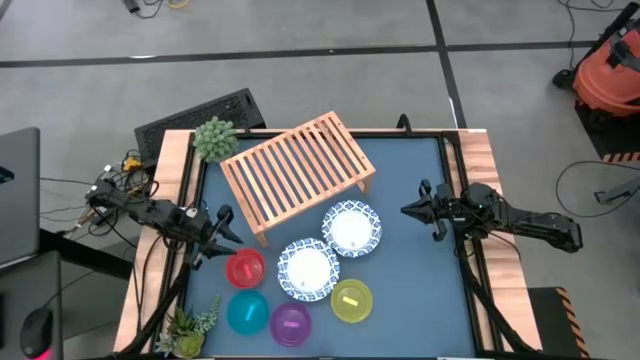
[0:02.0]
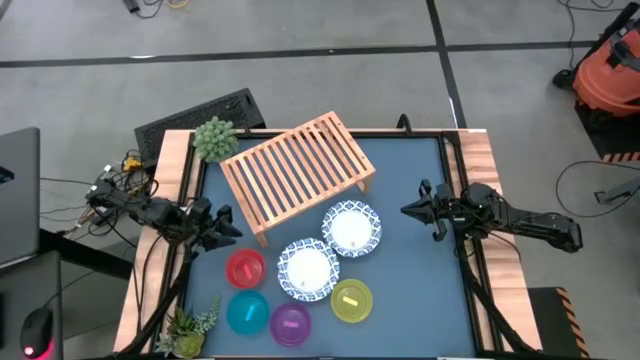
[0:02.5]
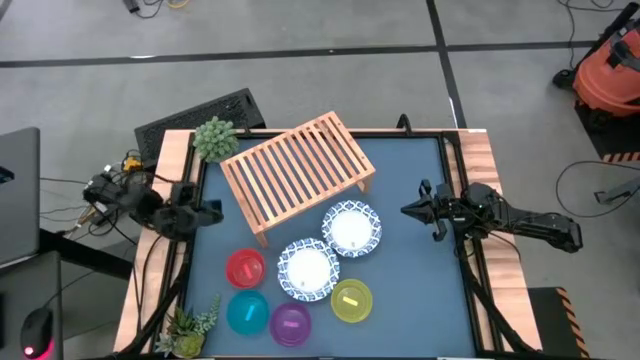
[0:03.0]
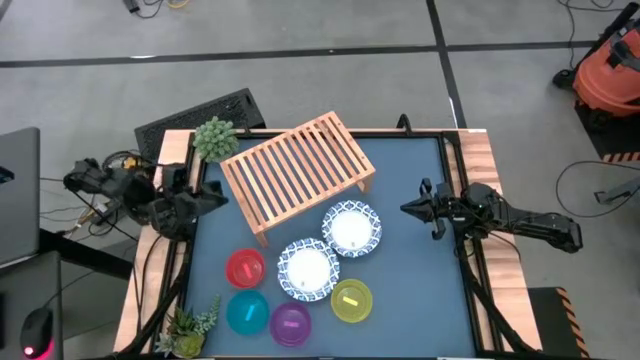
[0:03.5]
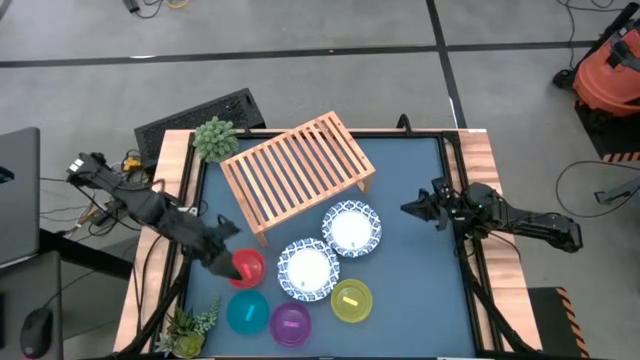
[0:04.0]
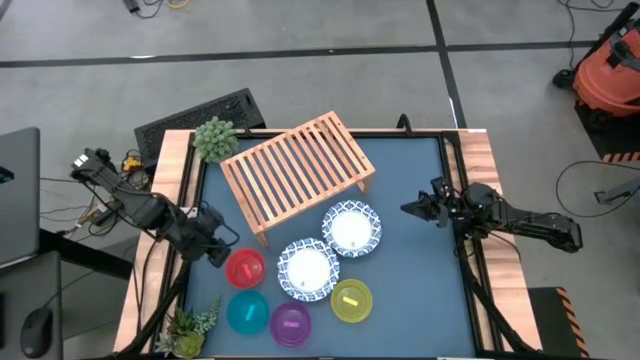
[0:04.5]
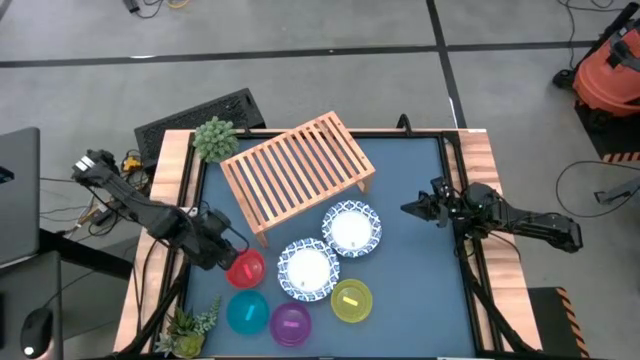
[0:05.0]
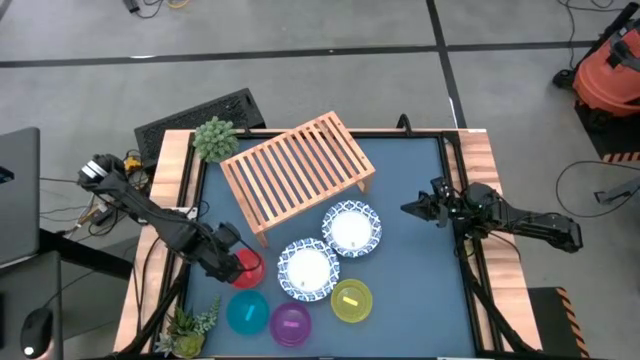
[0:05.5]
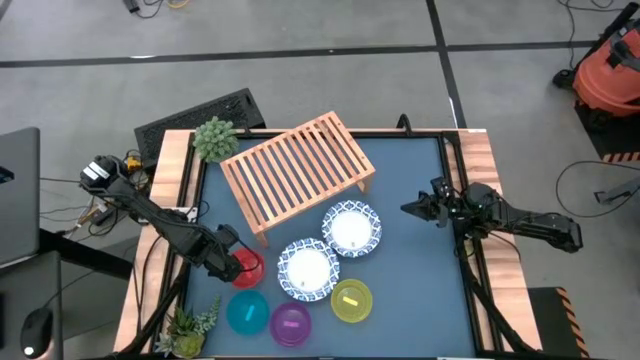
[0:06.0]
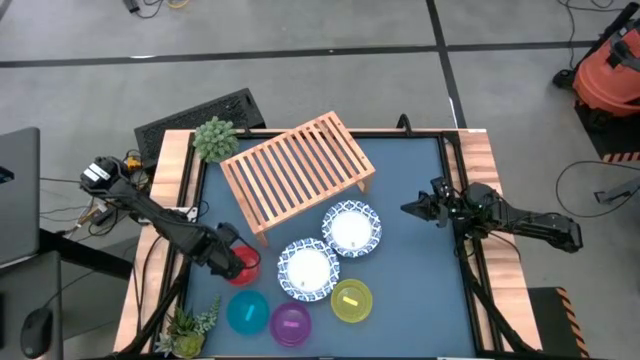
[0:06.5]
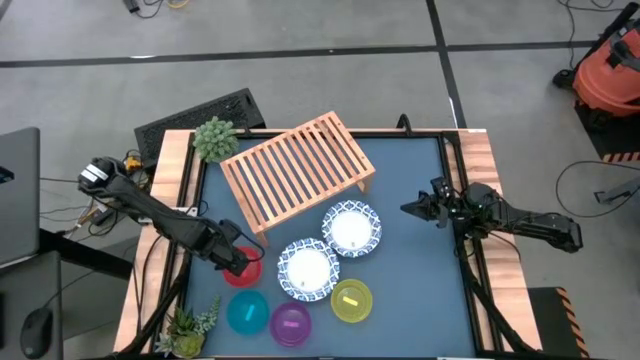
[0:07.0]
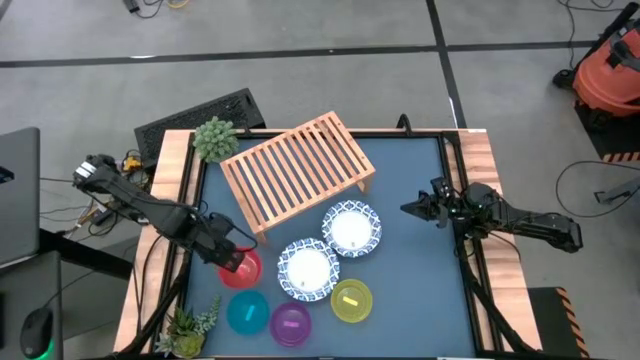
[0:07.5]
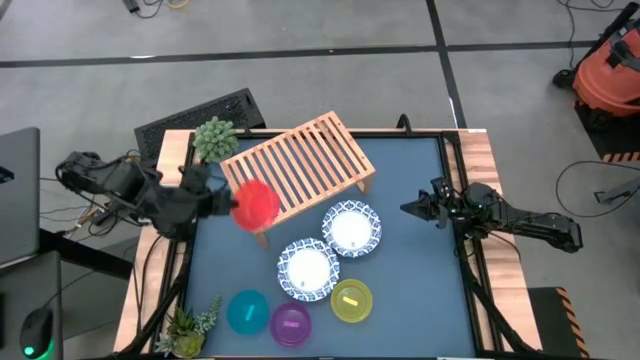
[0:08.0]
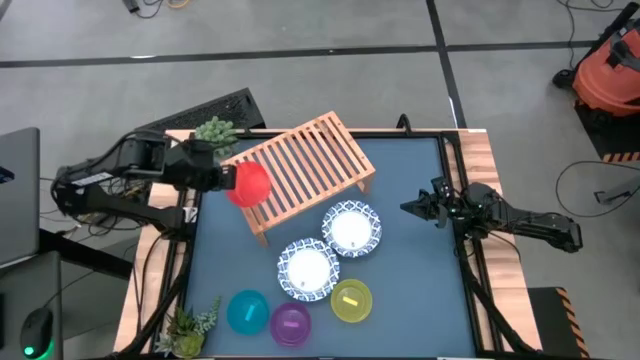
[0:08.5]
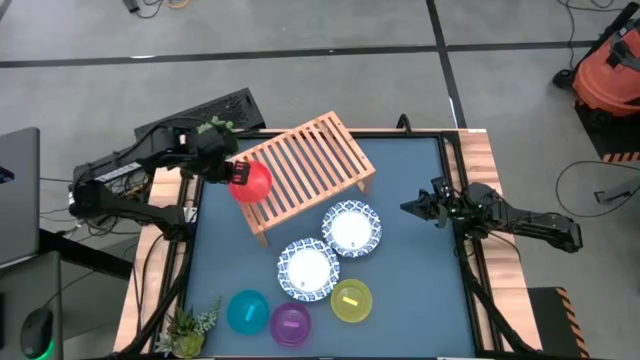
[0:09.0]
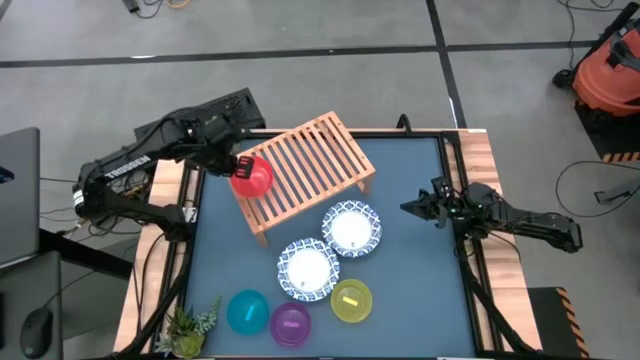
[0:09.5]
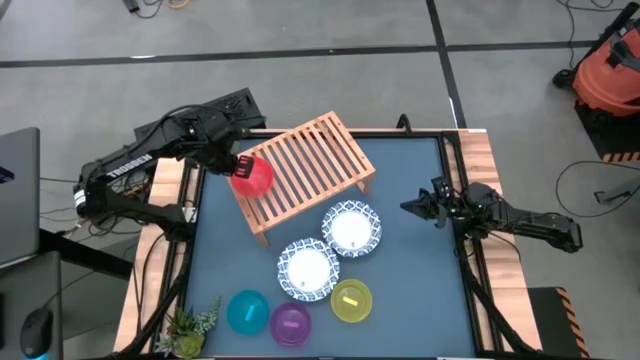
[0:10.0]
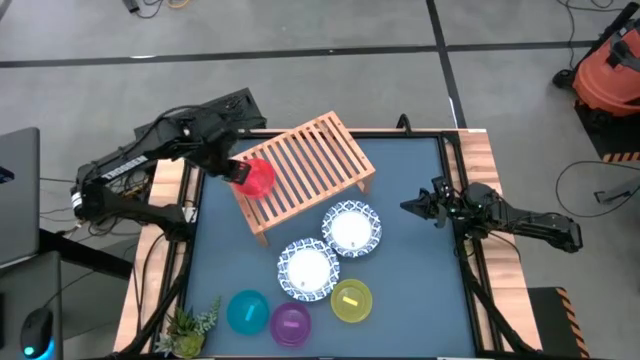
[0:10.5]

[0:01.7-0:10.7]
Task: Place and stack bowls onto a shelf
Put the orange bowl on the shelf

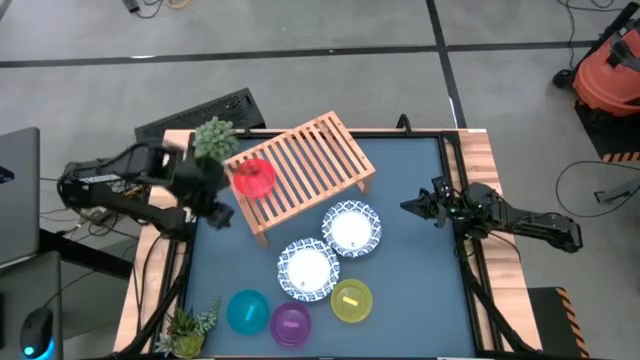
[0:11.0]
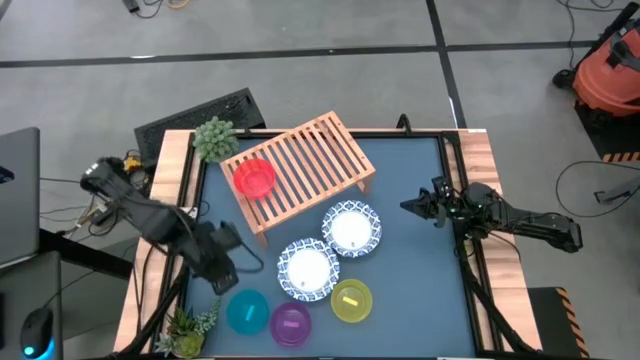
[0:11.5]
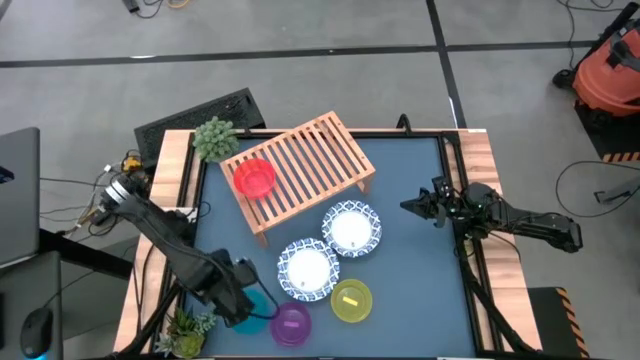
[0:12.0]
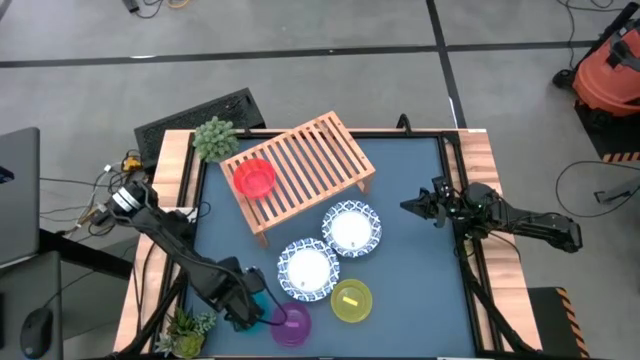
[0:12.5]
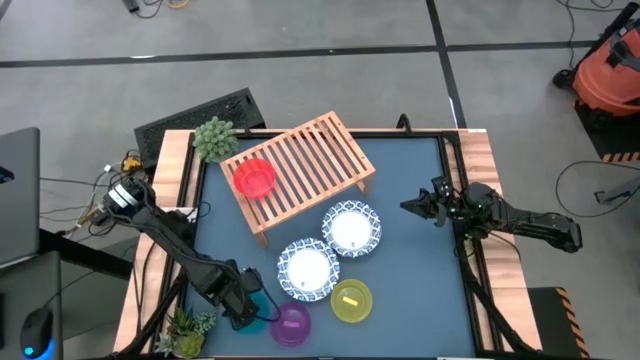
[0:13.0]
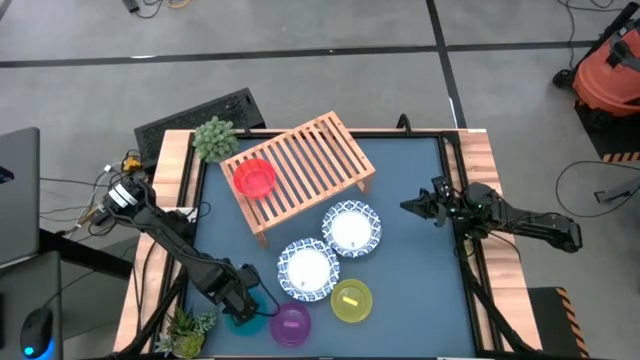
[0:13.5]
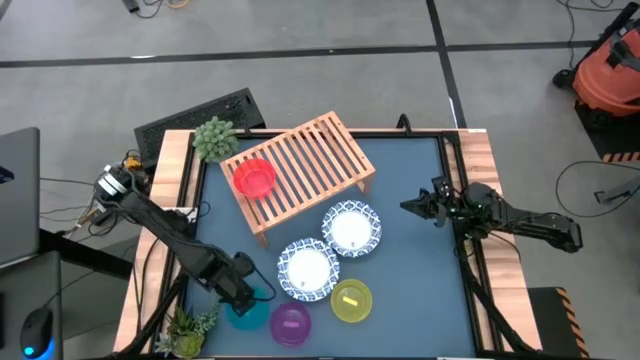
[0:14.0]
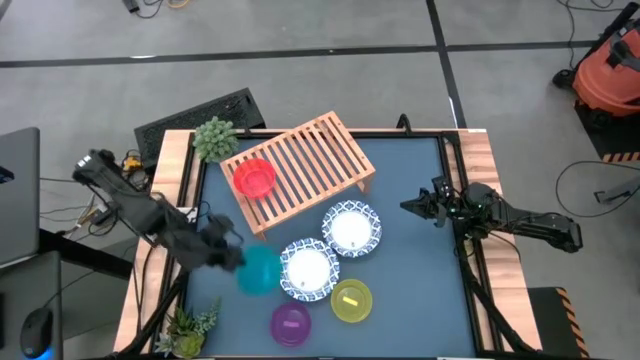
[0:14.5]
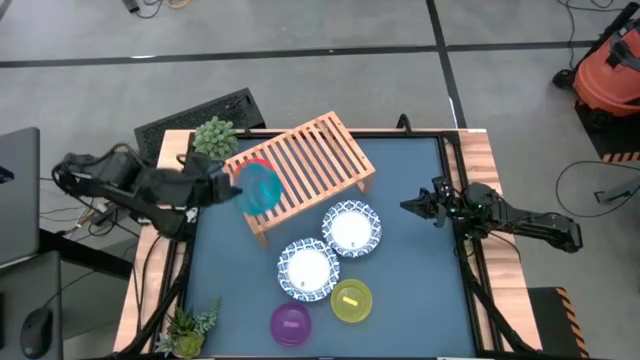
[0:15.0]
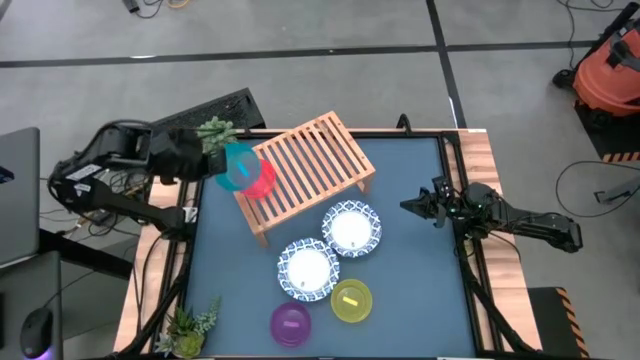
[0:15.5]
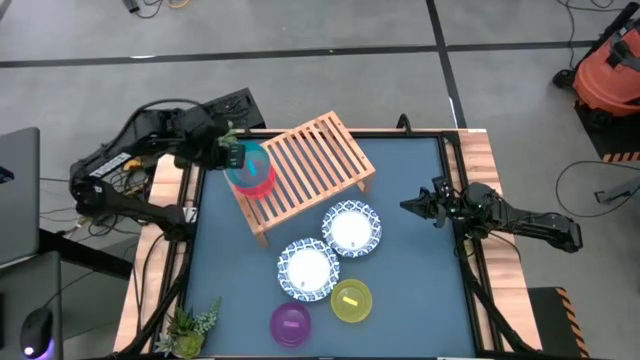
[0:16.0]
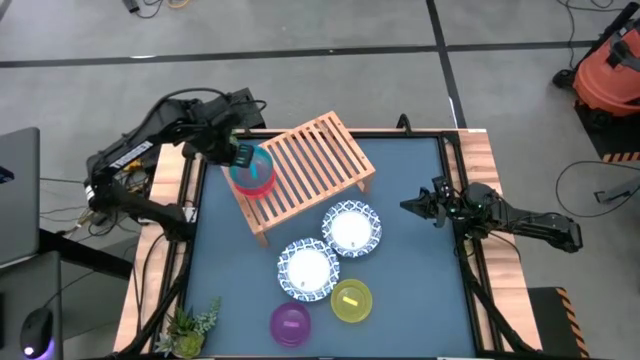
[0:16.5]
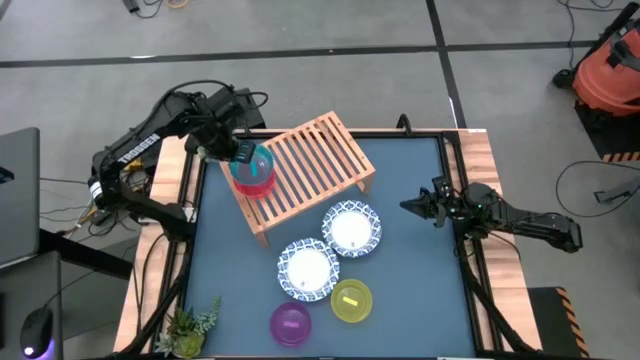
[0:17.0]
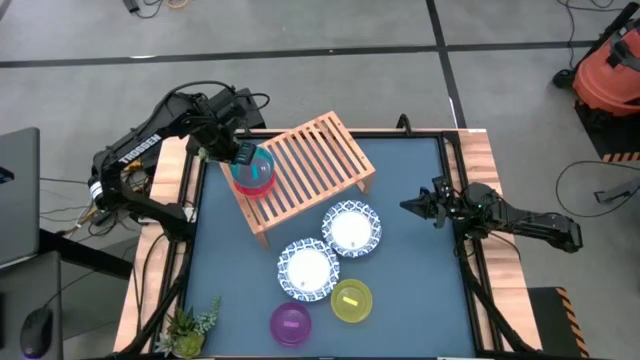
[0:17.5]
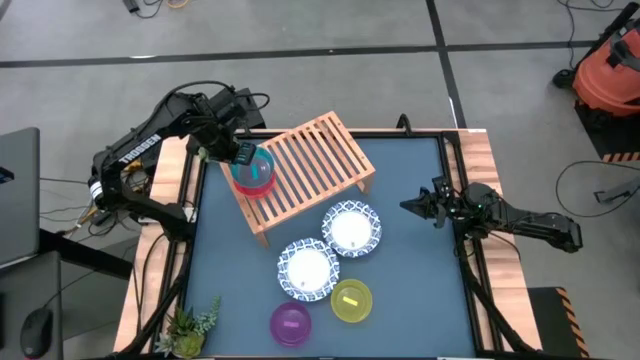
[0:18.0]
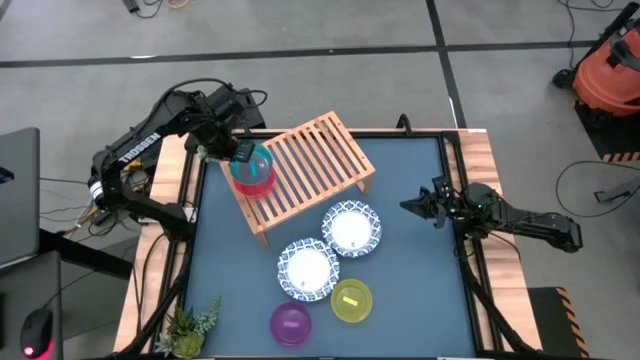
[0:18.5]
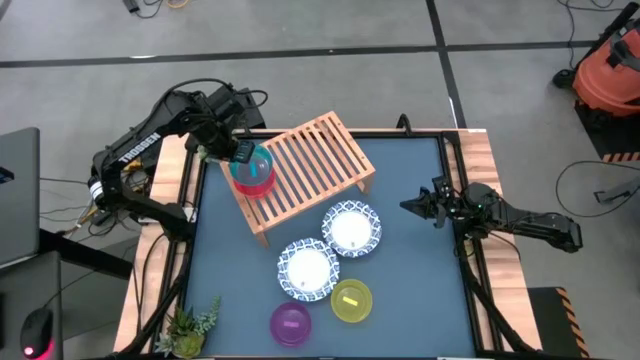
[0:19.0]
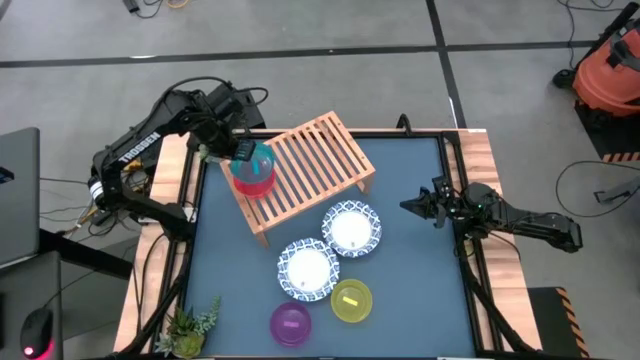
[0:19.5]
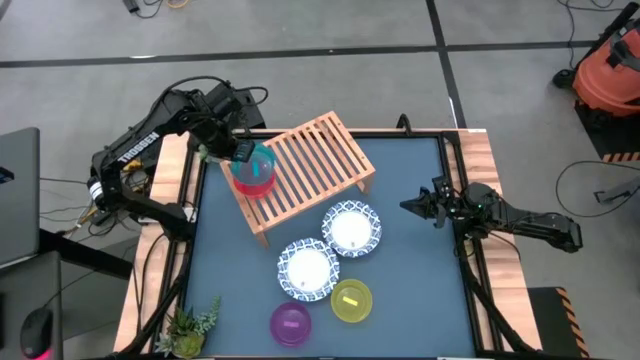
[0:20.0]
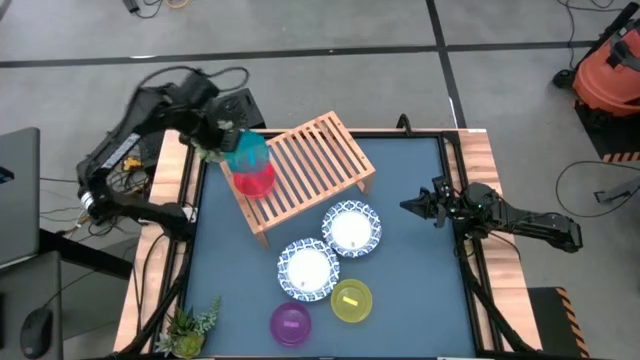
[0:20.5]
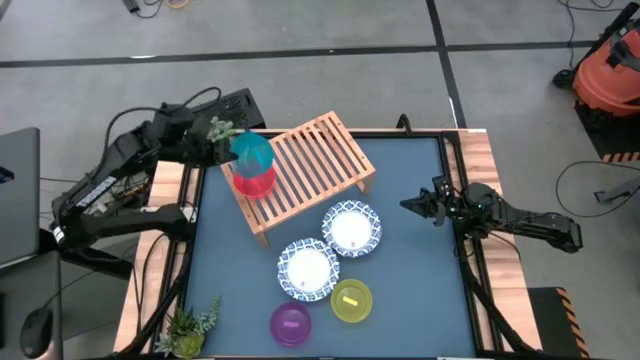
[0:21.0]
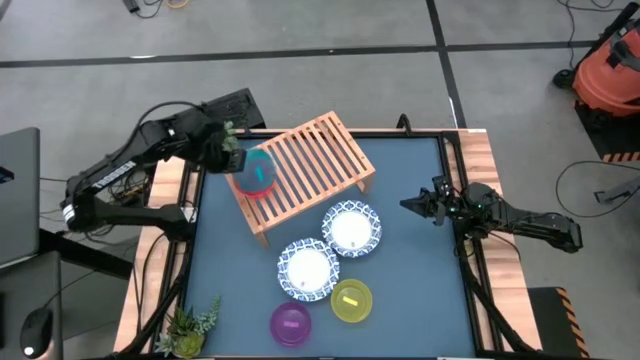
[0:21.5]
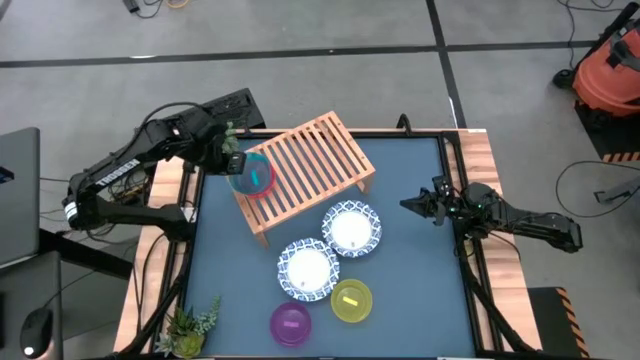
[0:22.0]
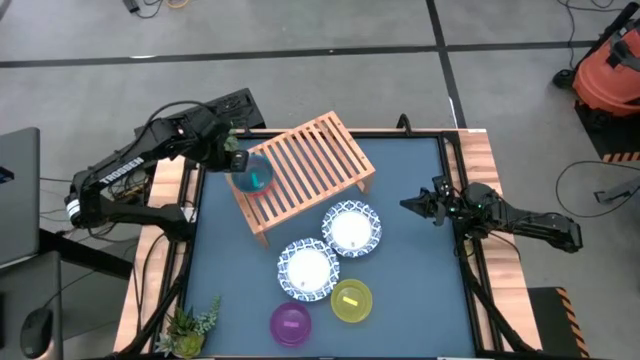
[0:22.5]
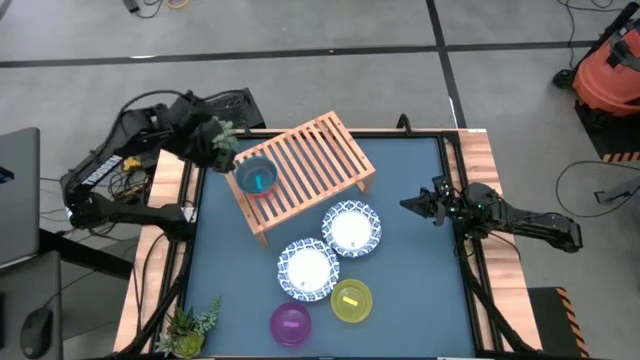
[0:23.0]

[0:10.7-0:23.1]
Stack the blue bowl into the orange bowl on the shelf
